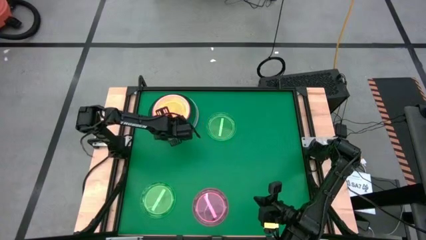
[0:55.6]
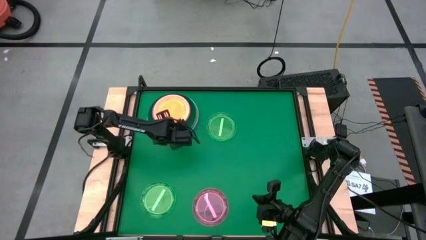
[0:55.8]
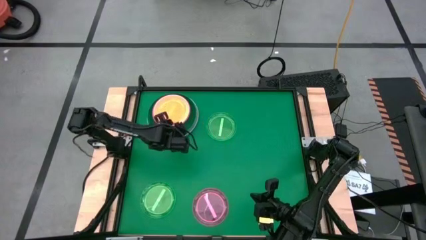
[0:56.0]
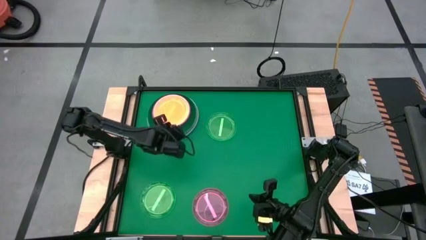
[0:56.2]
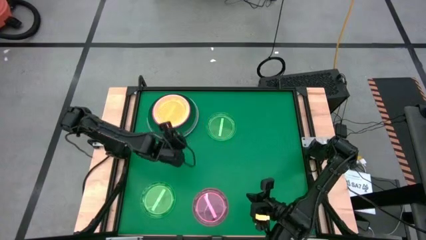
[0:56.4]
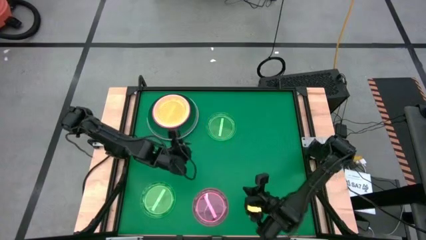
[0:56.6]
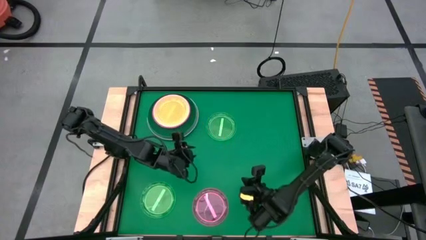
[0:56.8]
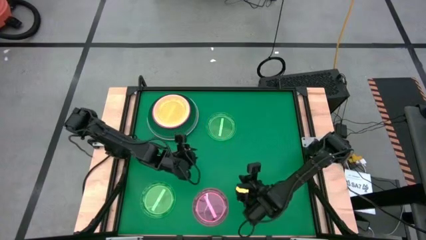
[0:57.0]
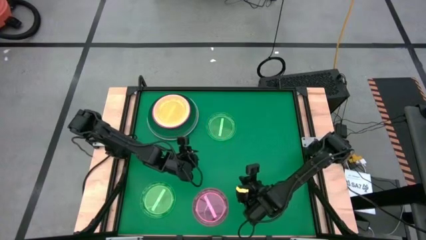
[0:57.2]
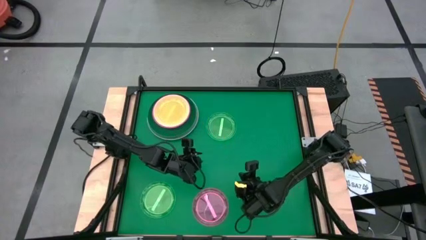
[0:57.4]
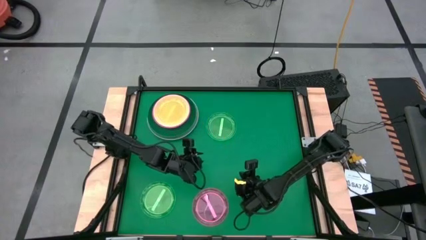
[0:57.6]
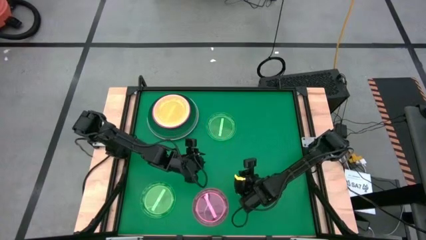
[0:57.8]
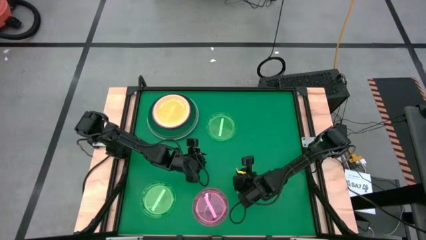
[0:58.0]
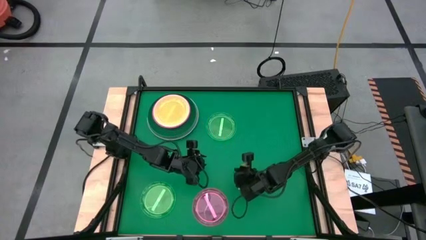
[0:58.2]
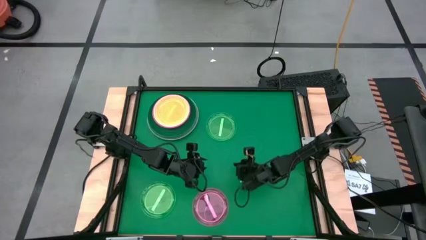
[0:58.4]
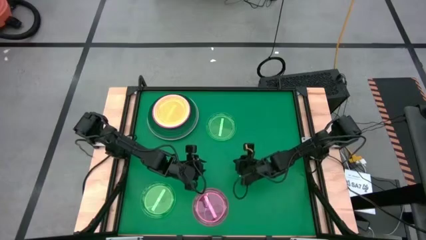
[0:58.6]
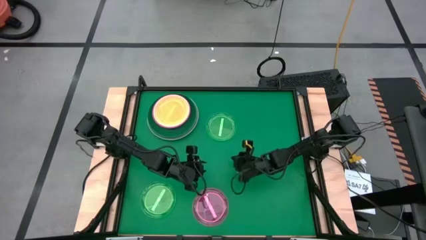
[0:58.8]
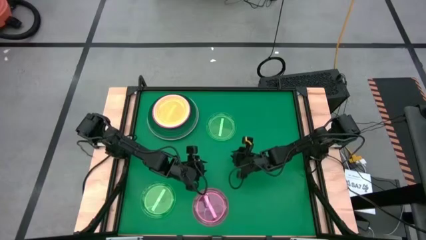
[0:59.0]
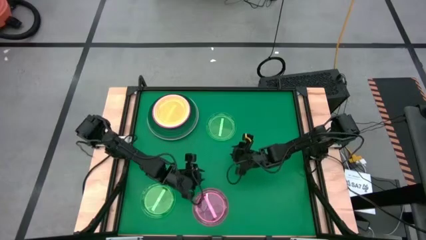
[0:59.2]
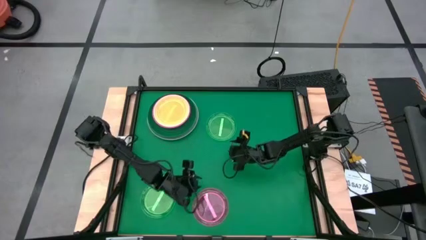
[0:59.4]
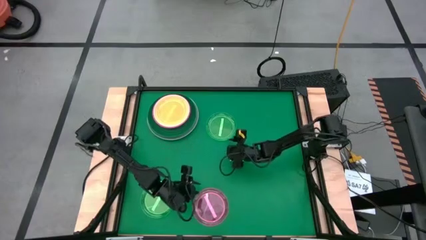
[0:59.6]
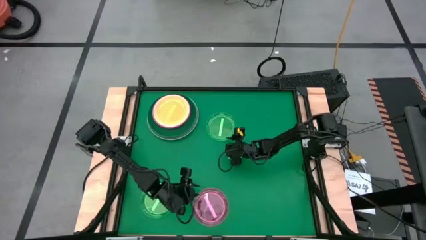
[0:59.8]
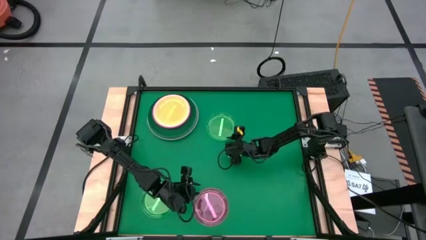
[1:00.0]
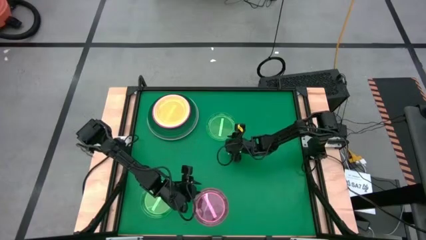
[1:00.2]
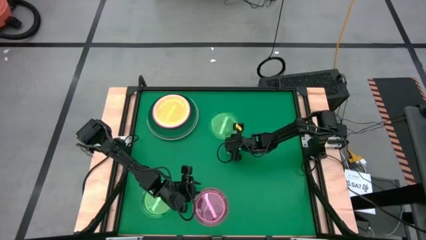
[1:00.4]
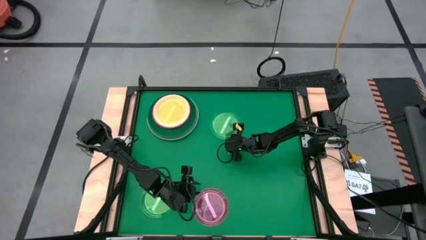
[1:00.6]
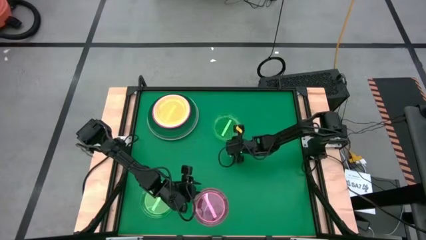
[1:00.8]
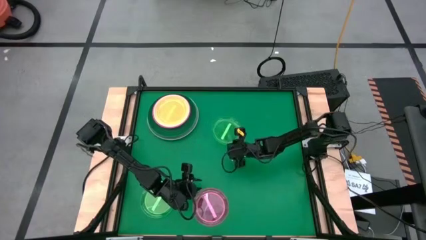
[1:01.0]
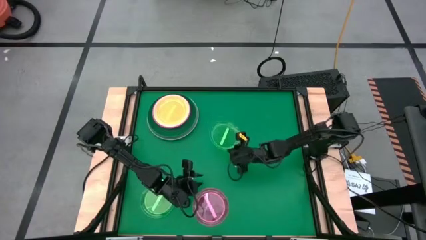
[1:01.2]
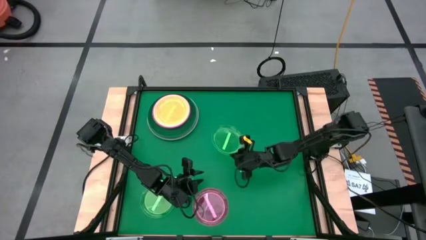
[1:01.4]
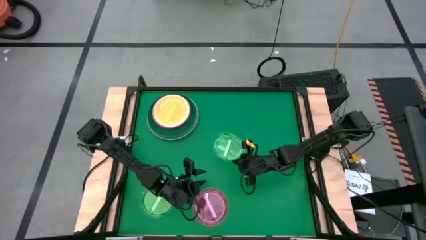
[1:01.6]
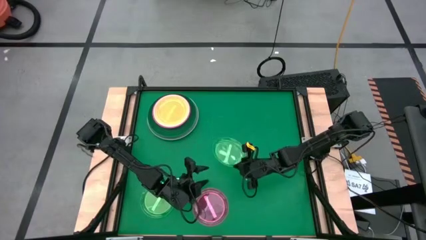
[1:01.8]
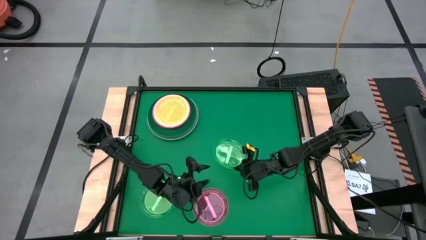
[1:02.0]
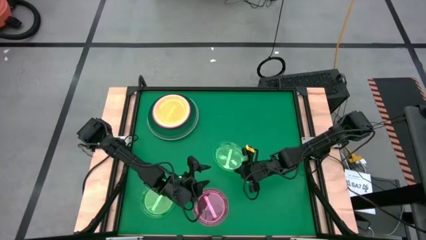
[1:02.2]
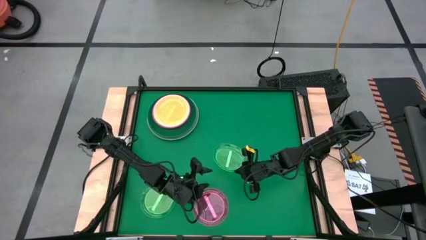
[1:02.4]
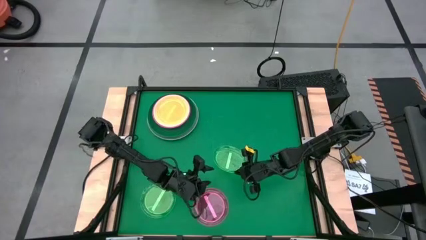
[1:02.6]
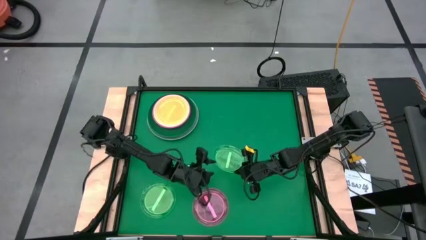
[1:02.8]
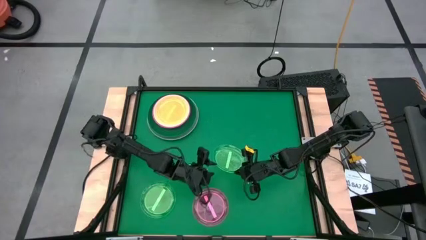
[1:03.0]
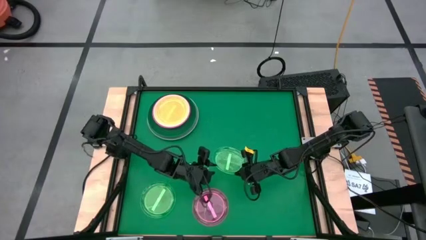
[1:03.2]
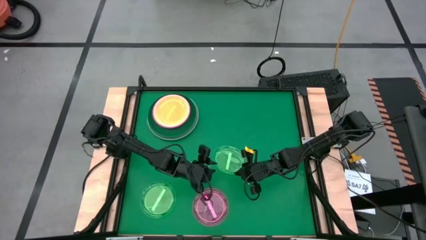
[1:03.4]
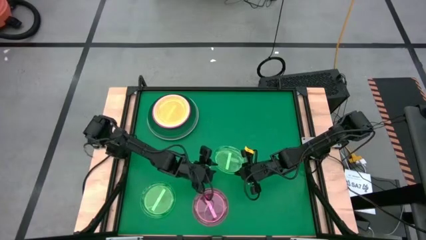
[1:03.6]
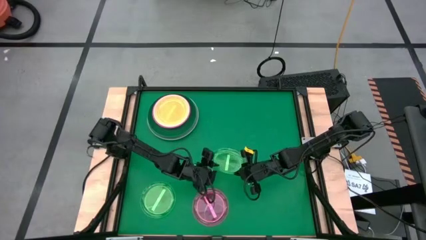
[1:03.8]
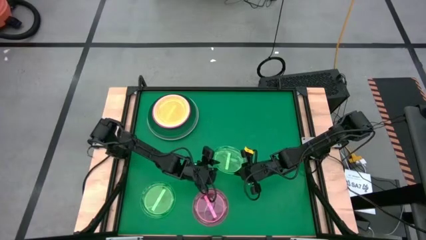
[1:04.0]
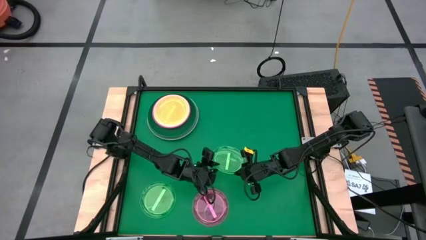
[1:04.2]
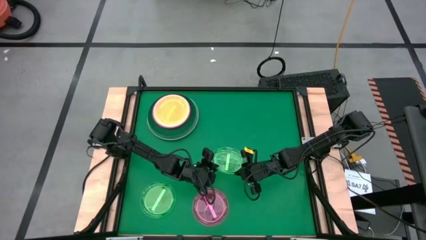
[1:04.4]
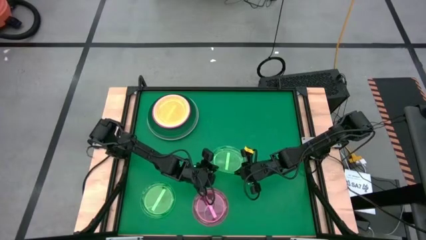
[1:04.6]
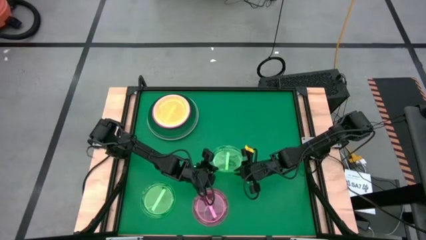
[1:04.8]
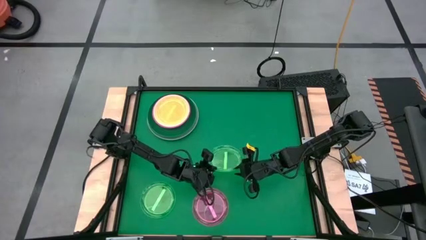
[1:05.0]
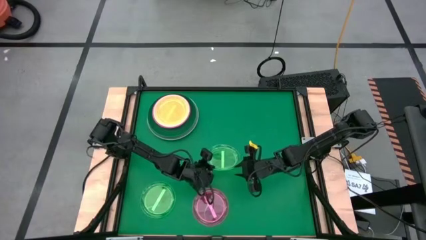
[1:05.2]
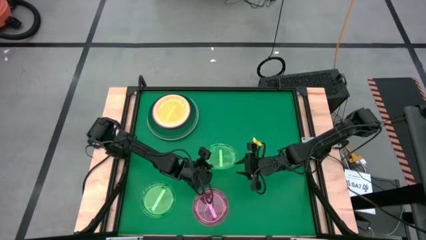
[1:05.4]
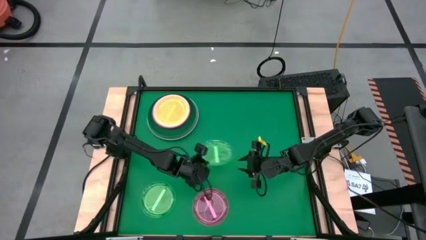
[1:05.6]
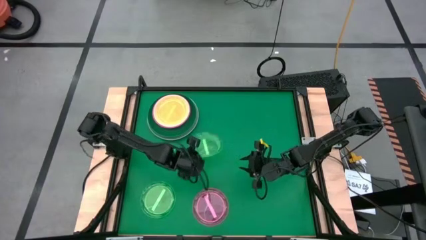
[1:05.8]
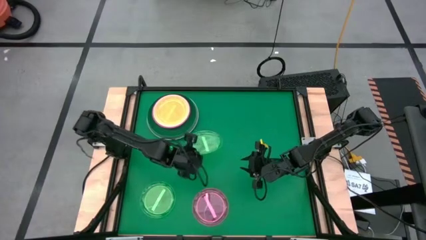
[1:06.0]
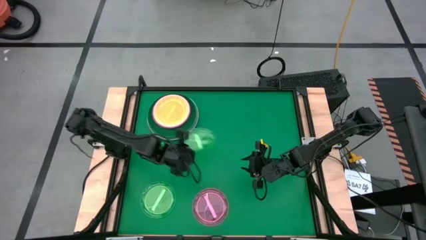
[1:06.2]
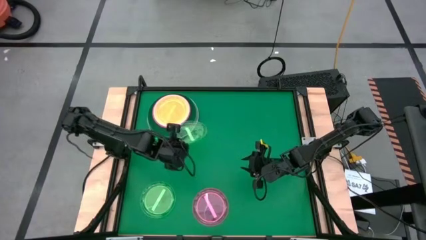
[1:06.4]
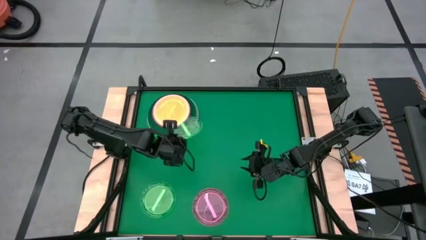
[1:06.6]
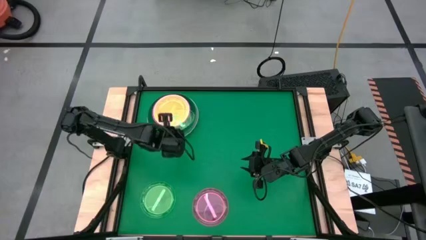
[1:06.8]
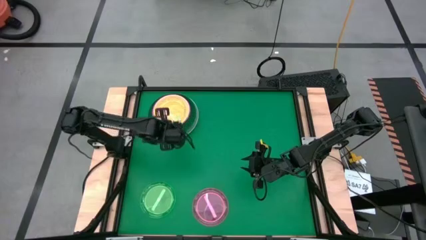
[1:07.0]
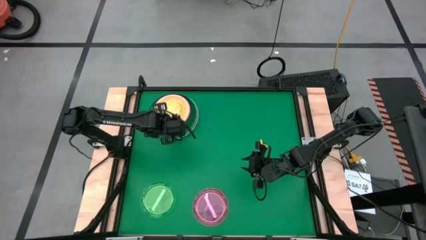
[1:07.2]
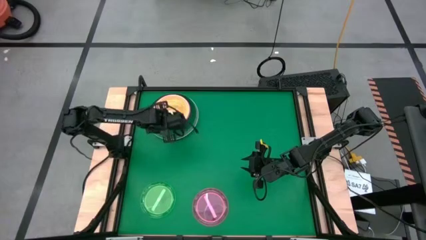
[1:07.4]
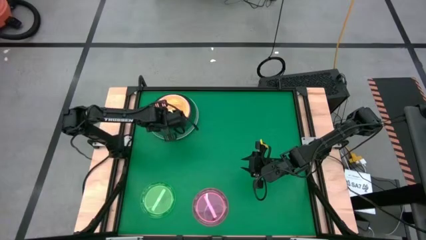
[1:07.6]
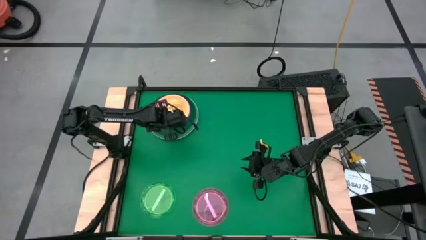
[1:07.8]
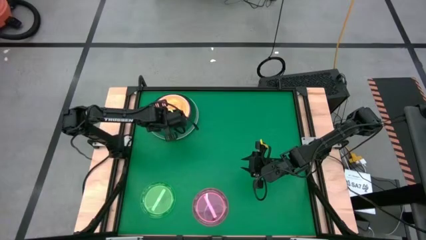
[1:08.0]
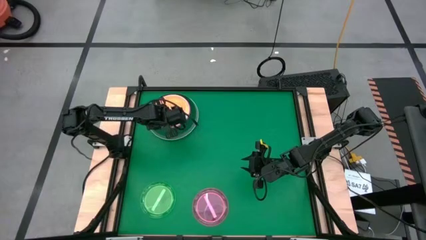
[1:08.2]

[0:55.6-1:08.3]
Task: Stack plastic plates
Stack the top green transparent plate on the orange transparent plate
